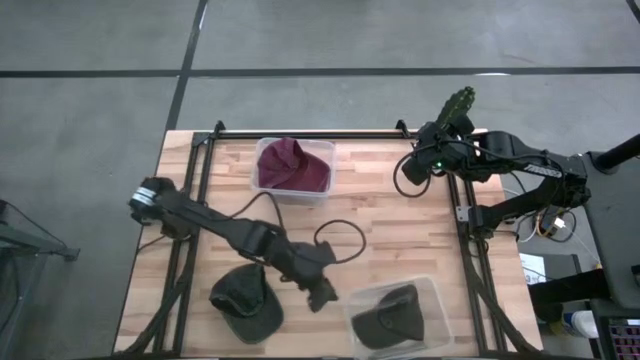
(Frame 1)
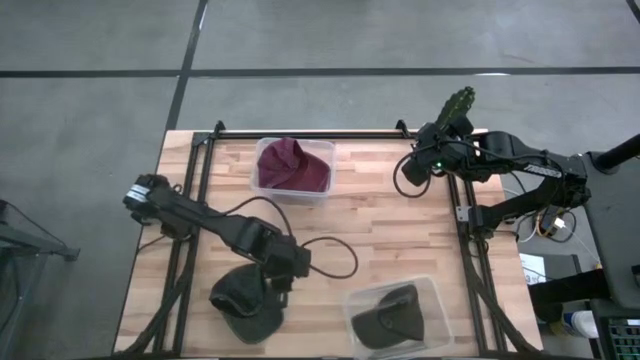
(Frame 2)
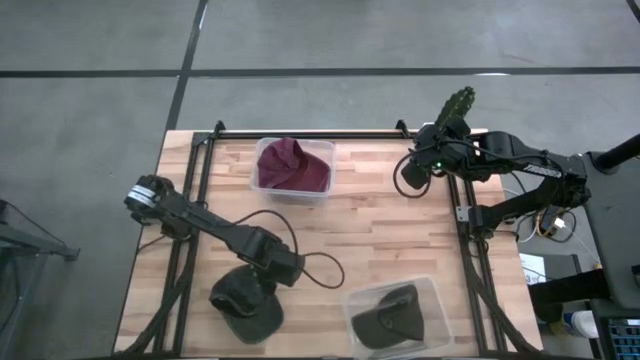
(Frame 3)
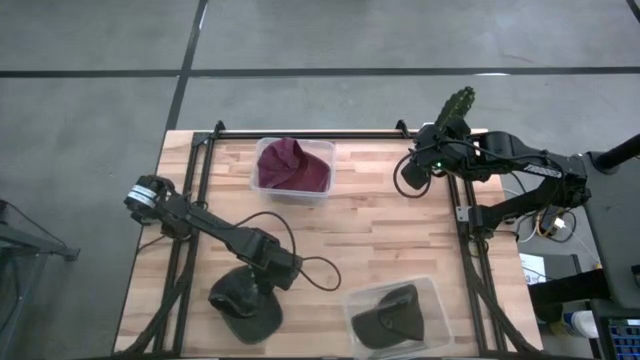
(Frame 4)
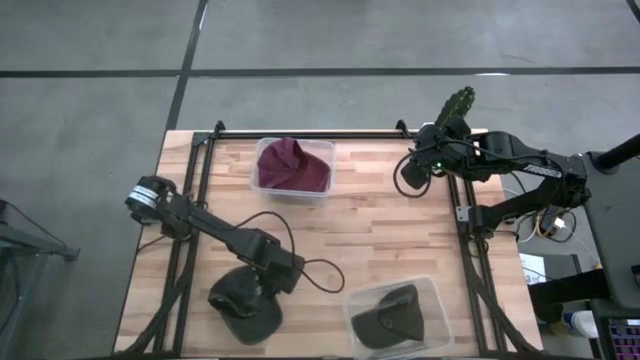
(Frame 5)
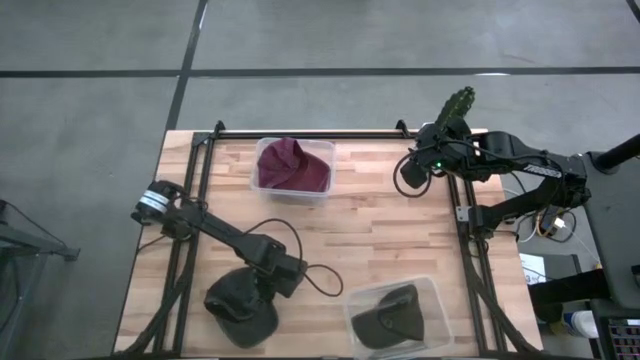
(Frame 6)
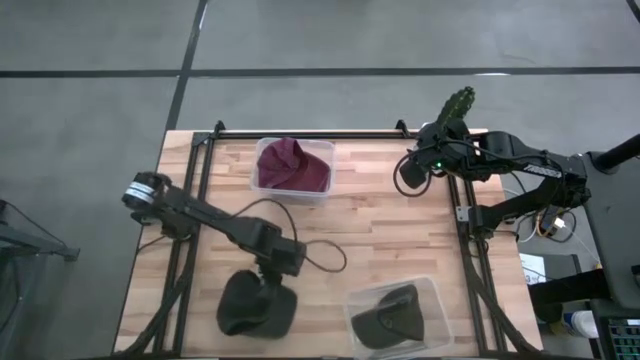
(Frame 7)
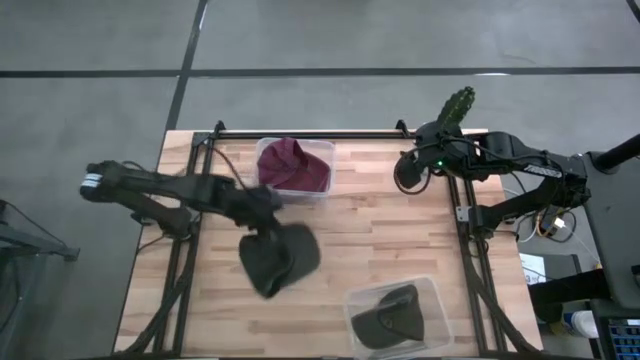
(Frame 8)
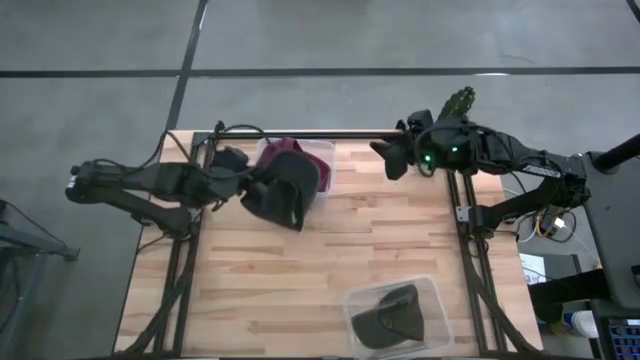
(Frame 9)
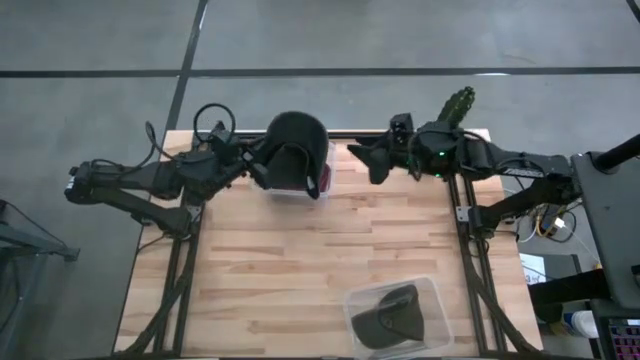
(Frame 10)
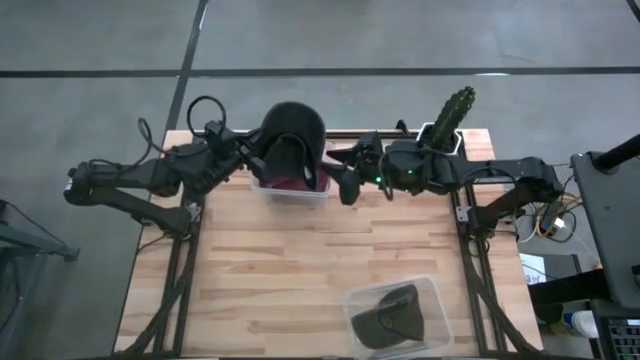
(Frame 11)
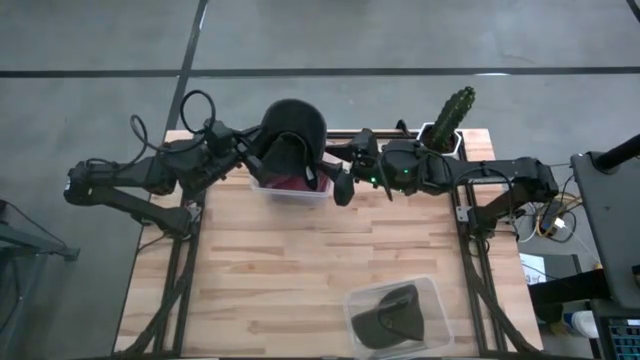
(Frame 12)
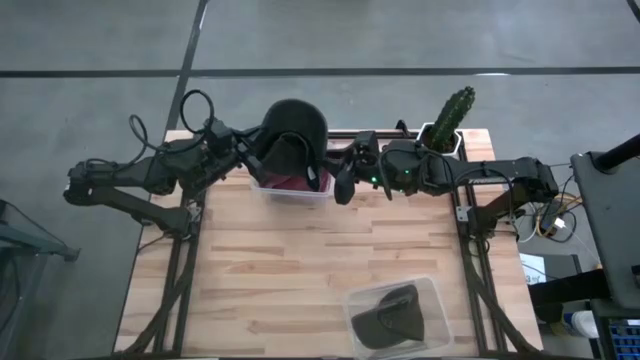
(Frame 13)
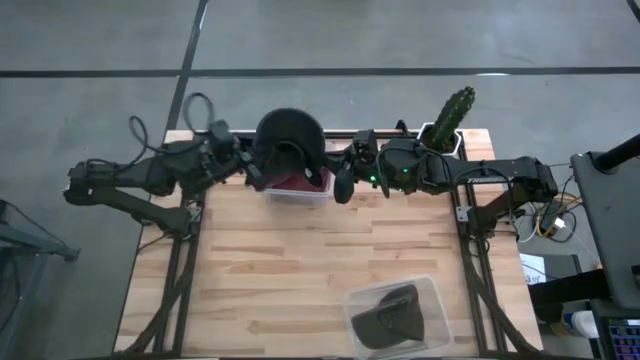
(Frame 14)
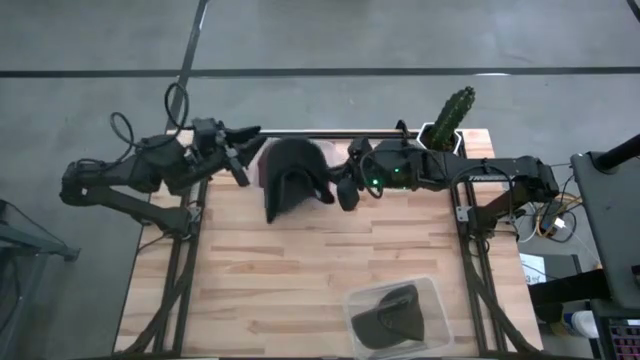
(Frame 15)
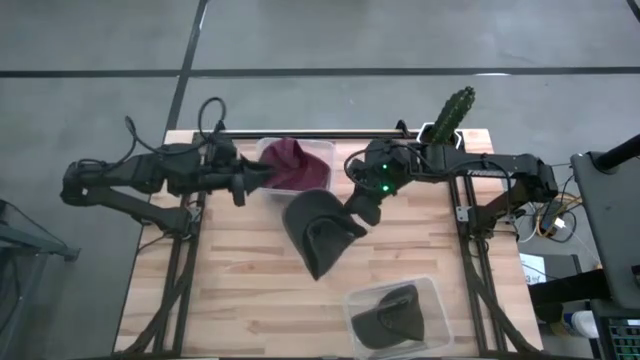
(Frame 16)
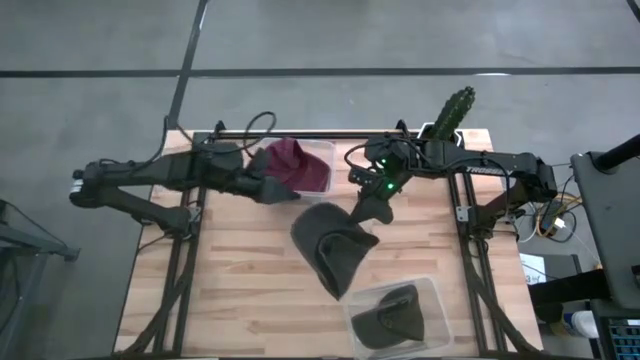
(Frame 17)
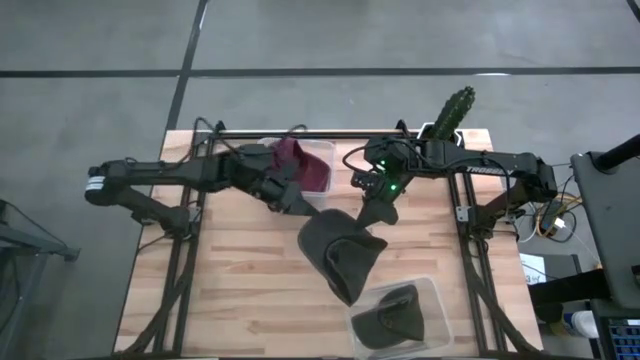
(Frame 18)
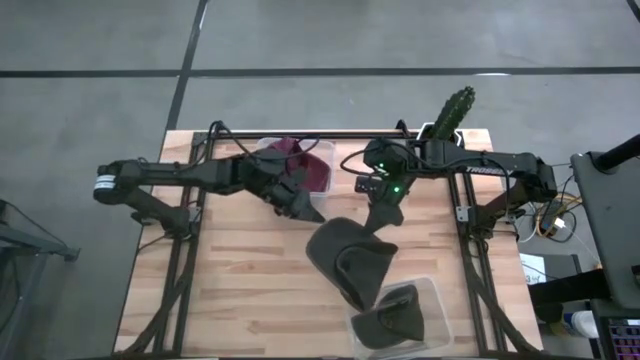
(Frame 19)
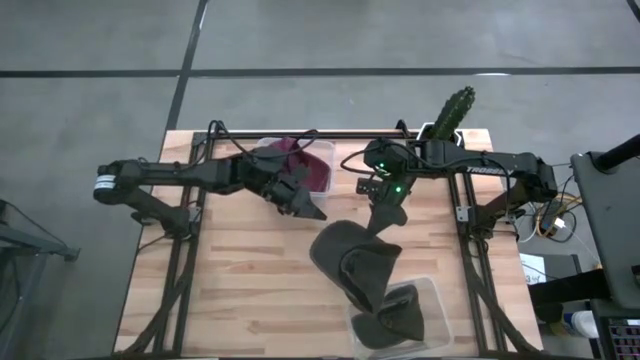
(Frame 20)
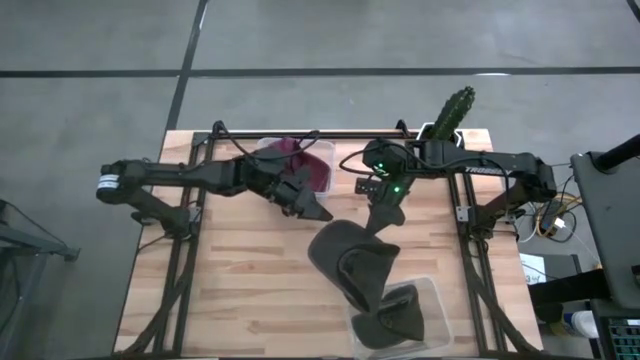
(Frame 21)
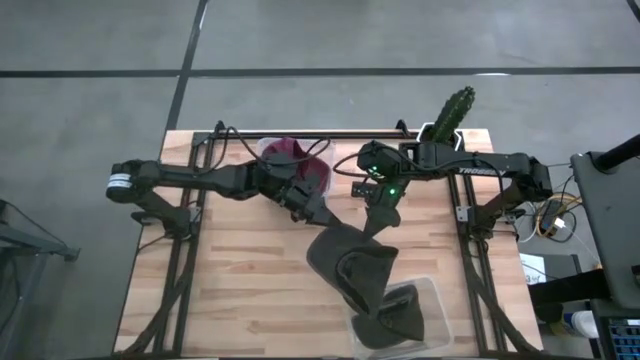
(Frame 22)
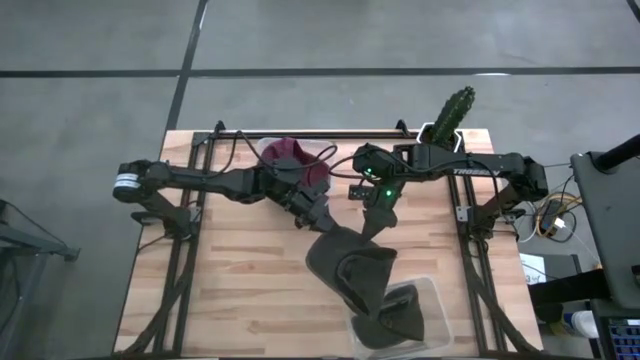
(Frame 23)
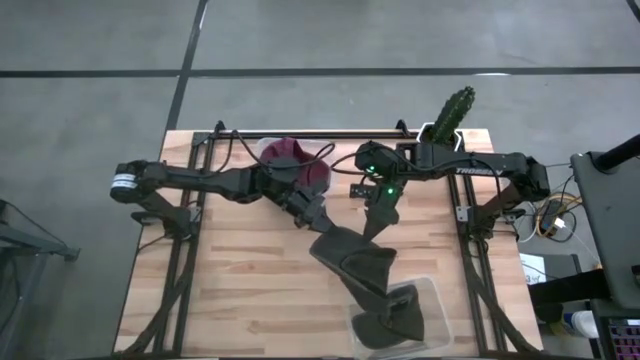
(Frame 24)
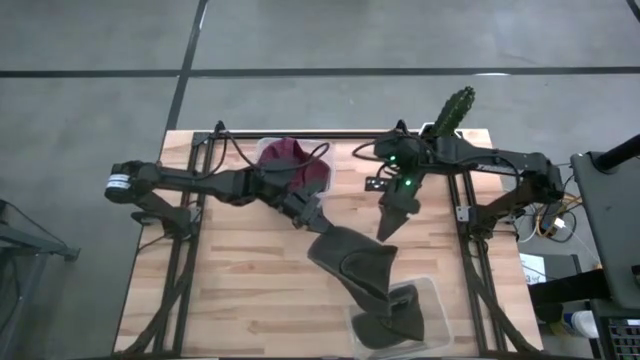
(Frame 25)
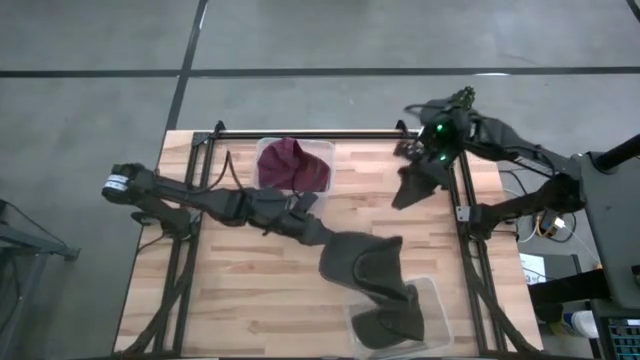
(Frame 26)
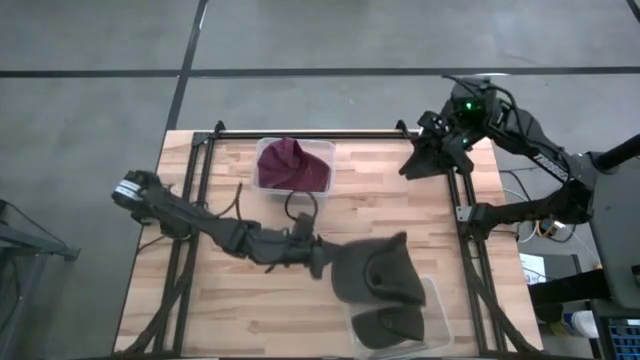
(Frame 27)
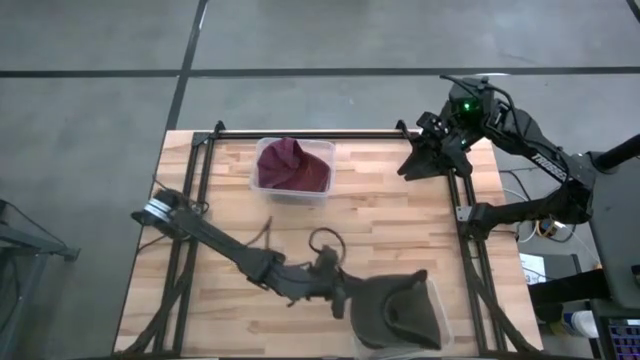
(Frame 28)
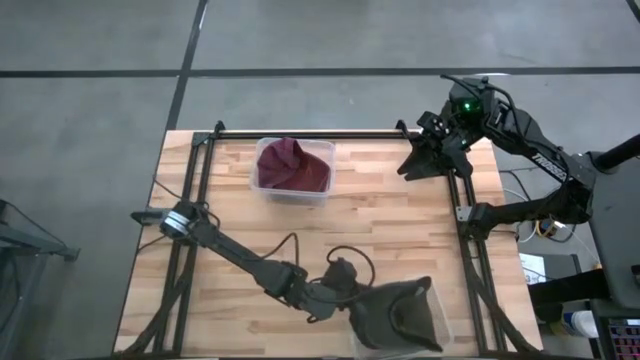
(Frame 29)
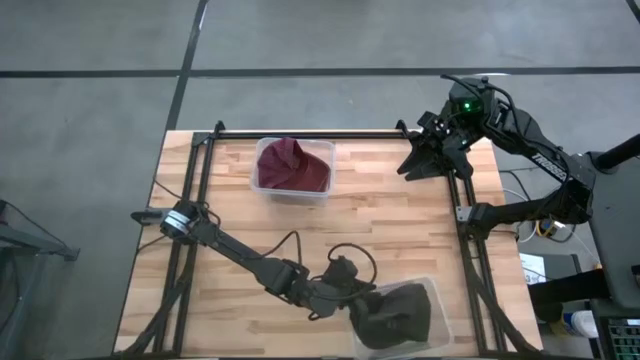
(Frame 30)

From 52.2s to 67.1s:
Task: Pick and place caps into container
Put the black cap into the bottom transparent container

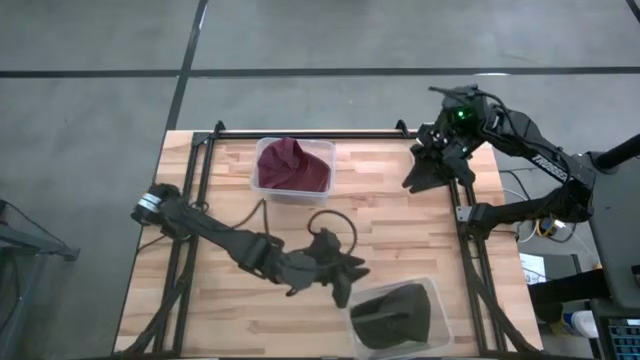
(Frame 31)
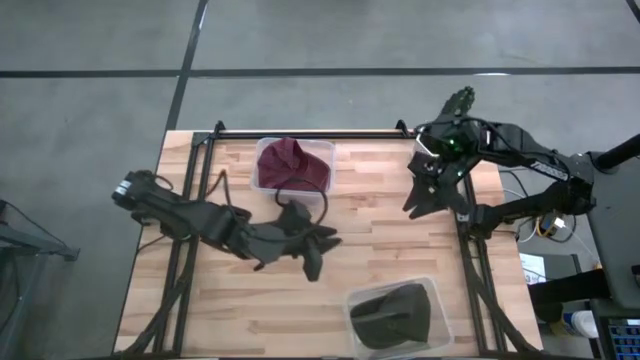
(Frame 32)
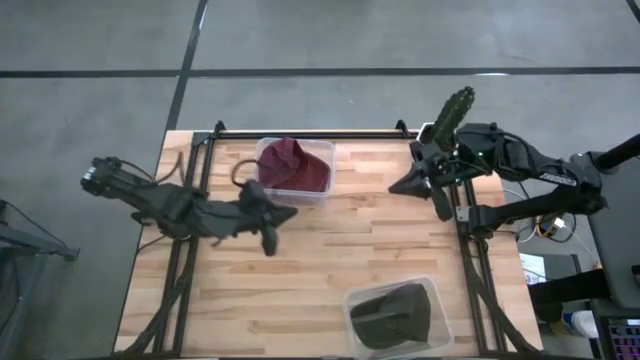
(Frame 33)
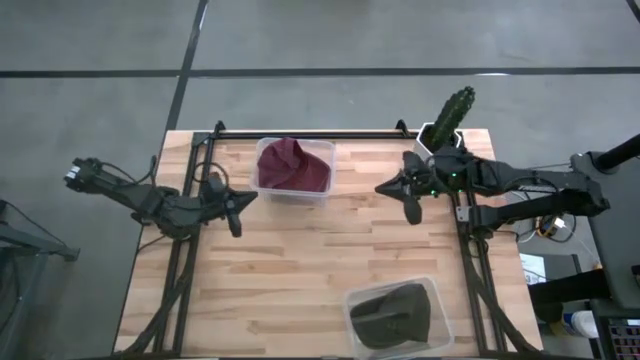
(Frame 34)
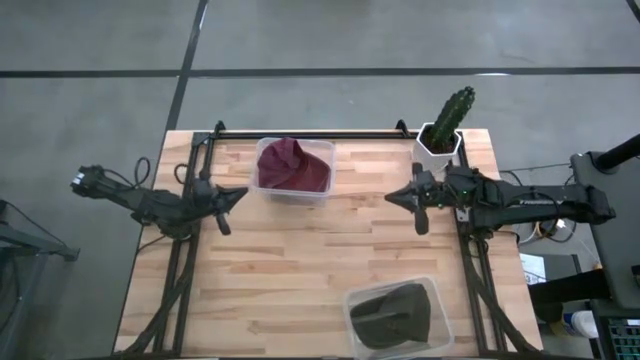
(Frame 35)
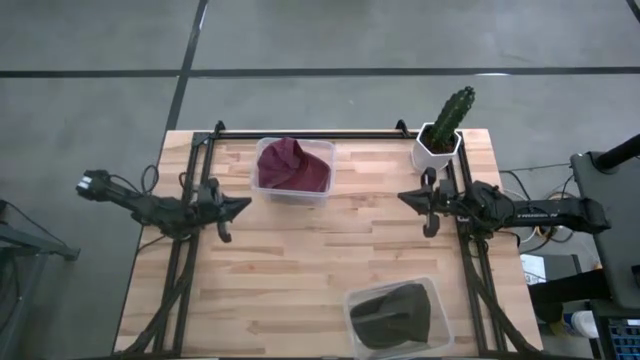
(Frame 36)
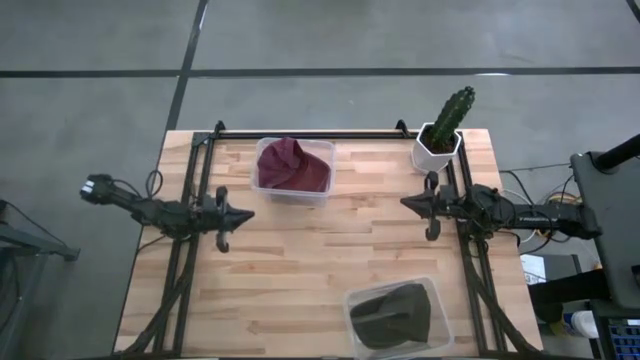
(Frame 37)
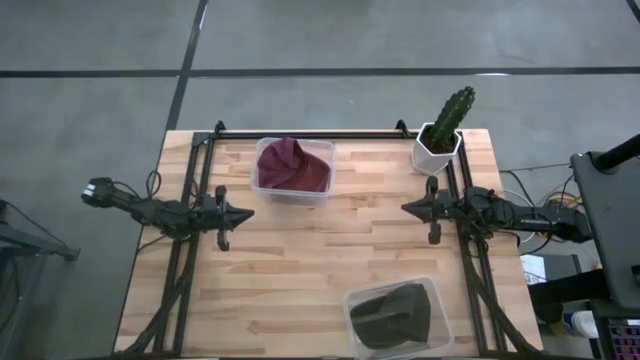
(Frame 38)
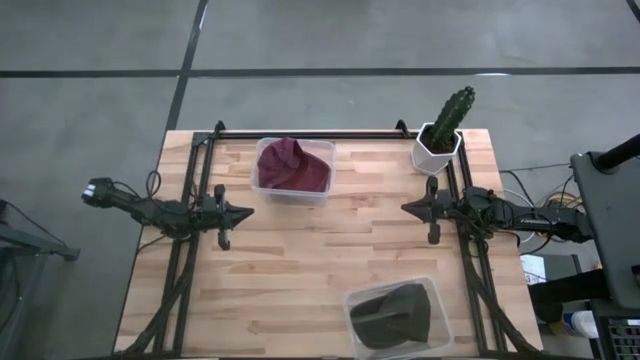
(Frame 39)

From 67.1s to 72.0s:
Return to Home Position

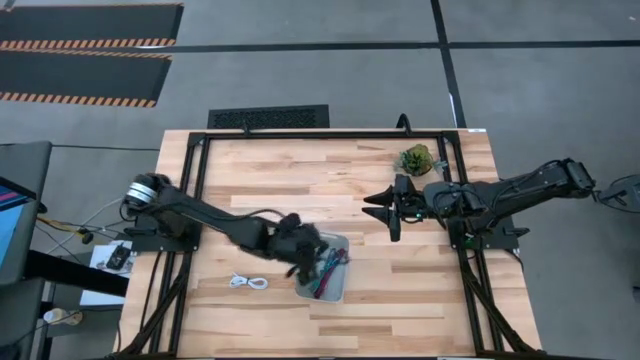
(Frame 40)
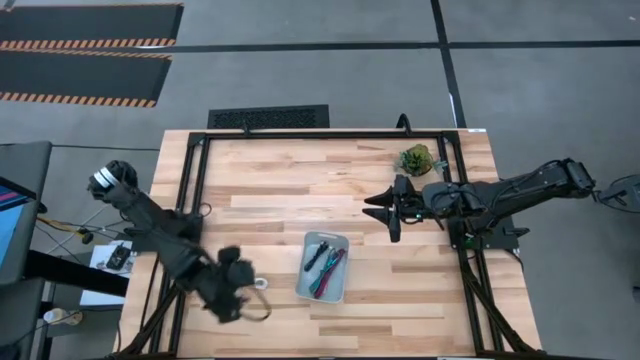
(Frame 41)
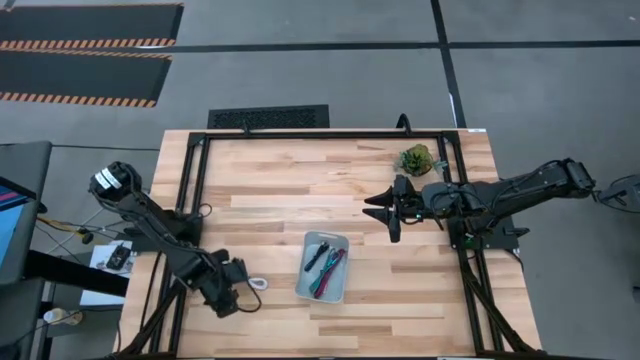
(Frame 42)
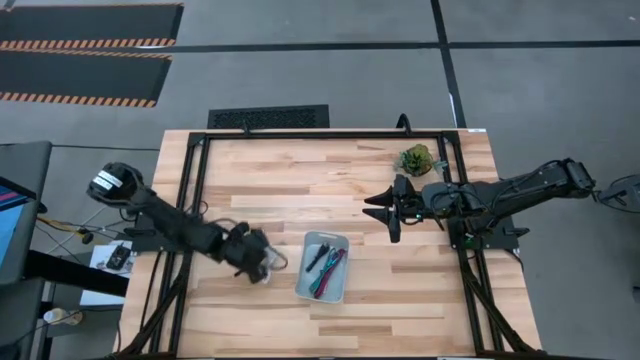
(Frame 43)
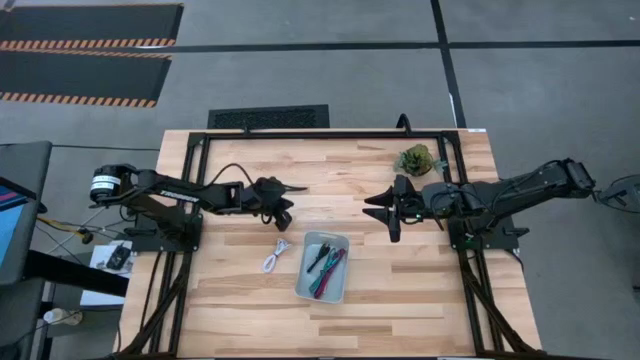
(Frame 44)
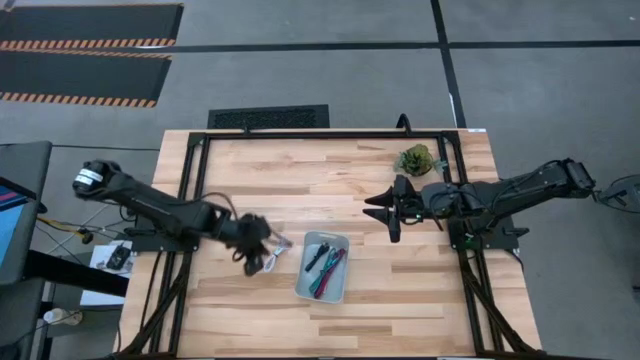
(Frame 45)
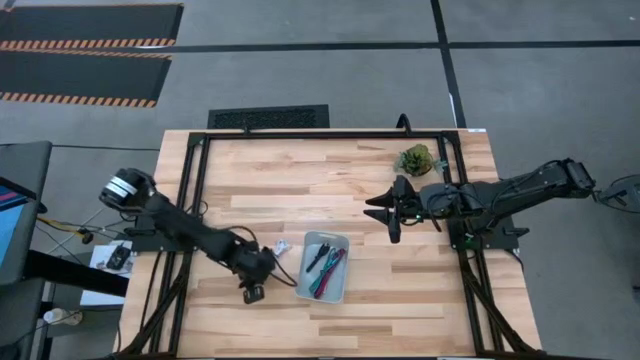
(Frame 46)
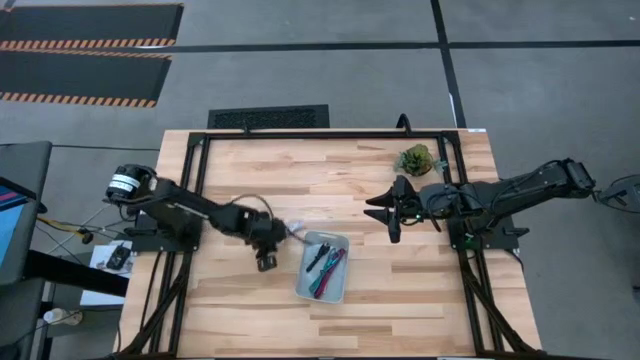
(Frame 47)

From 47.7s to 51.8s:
Task: Pick and place USB-C Cables
Move the white charger cable to the center of the table
